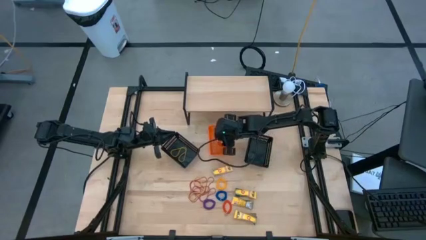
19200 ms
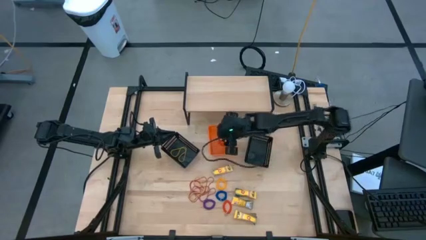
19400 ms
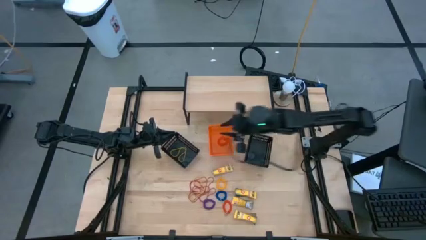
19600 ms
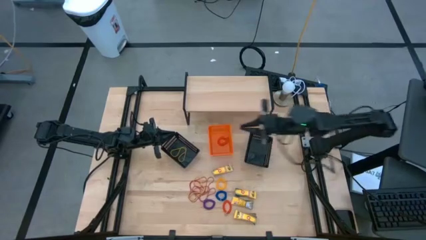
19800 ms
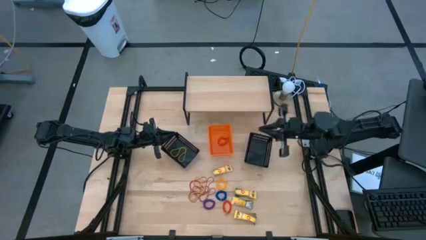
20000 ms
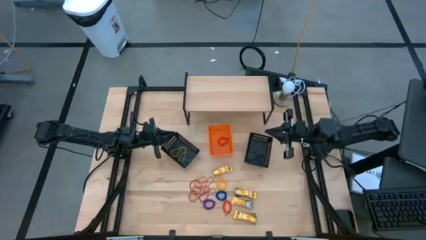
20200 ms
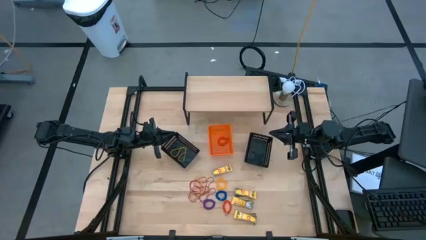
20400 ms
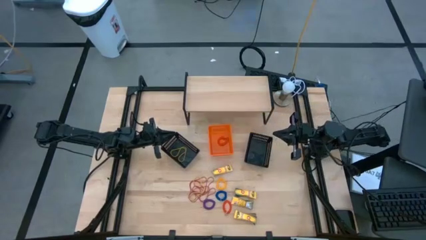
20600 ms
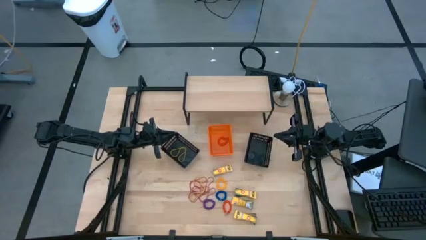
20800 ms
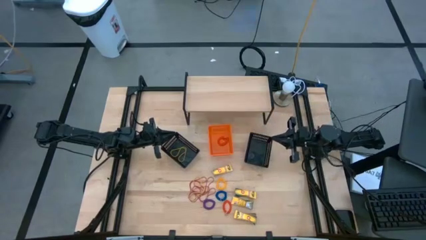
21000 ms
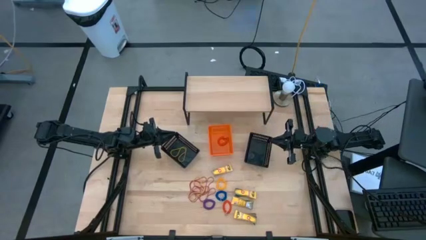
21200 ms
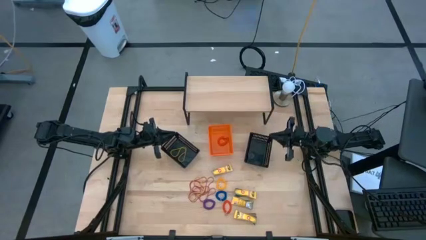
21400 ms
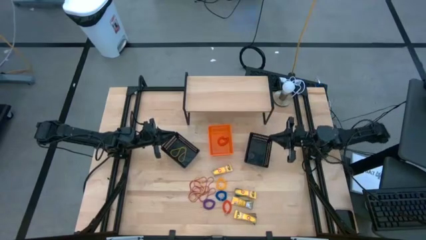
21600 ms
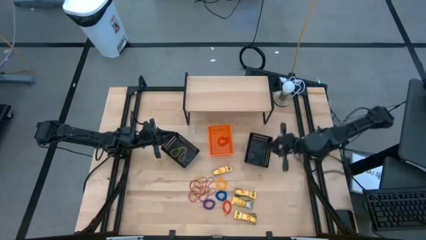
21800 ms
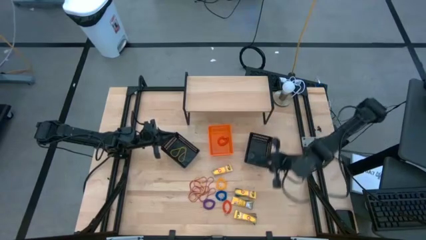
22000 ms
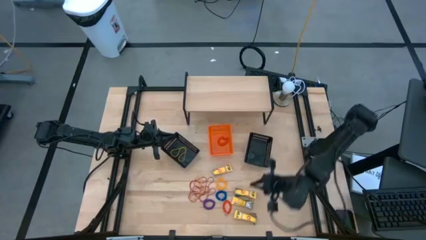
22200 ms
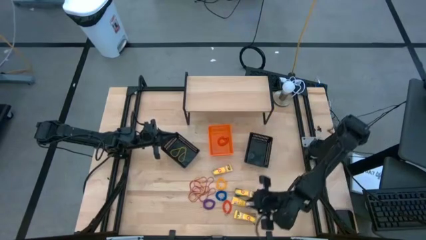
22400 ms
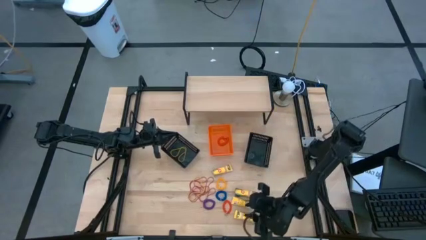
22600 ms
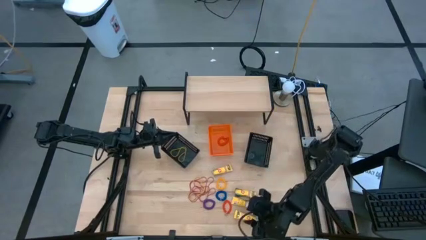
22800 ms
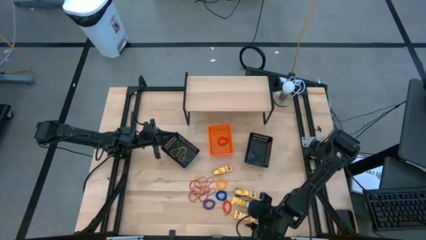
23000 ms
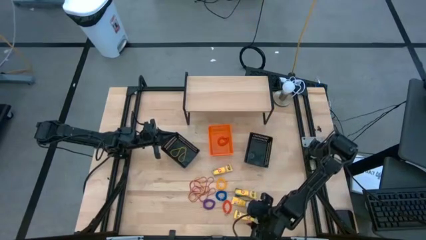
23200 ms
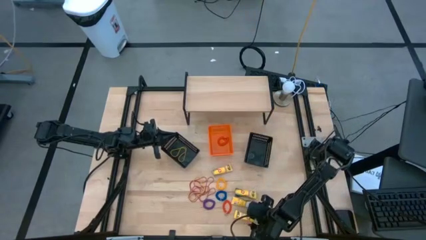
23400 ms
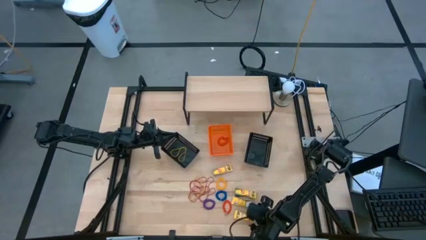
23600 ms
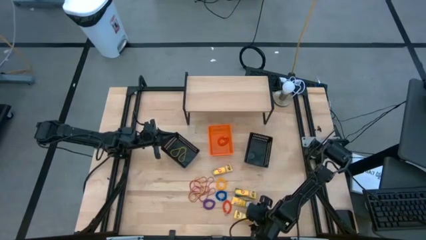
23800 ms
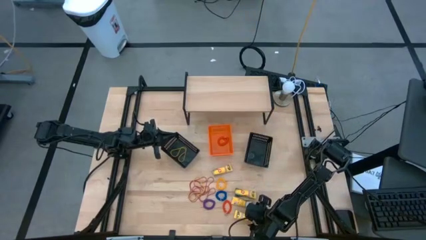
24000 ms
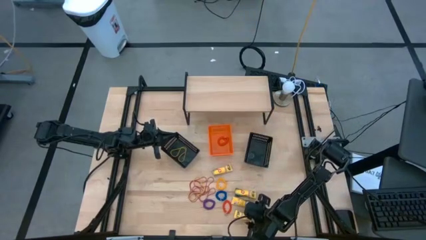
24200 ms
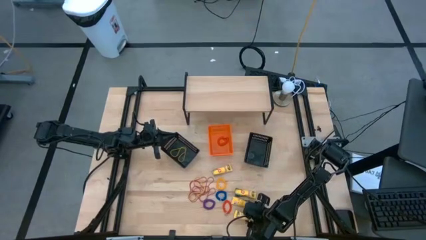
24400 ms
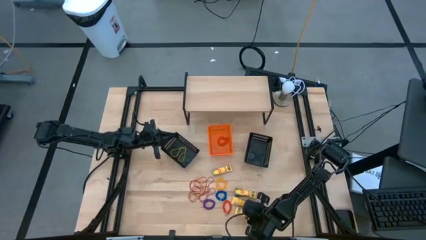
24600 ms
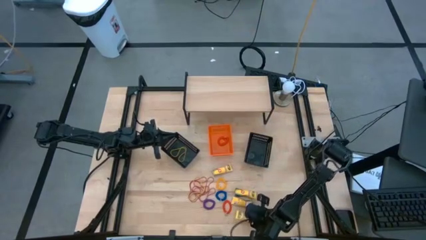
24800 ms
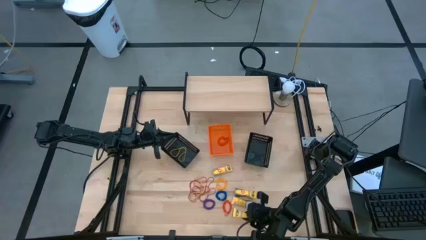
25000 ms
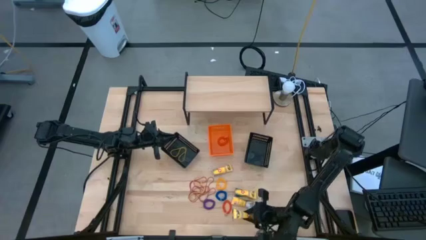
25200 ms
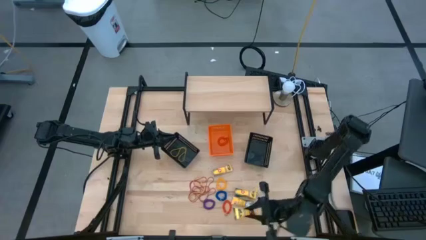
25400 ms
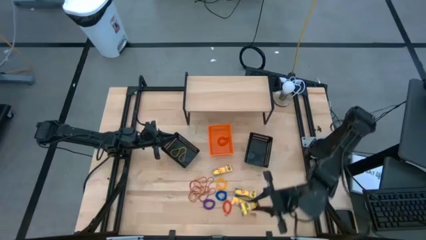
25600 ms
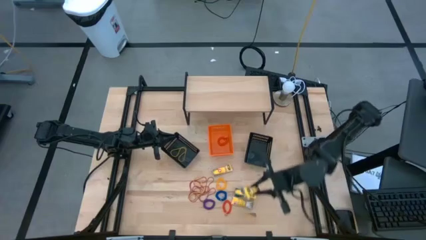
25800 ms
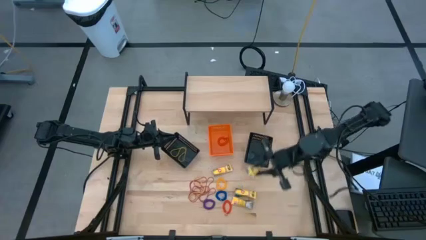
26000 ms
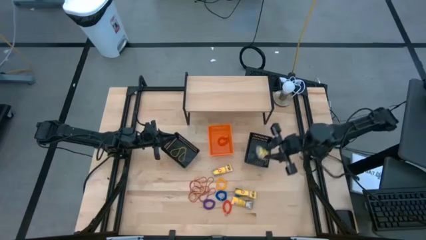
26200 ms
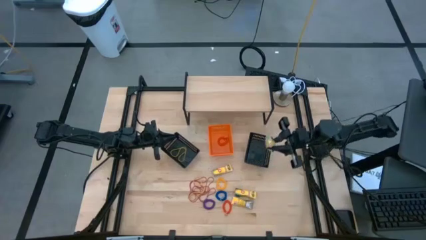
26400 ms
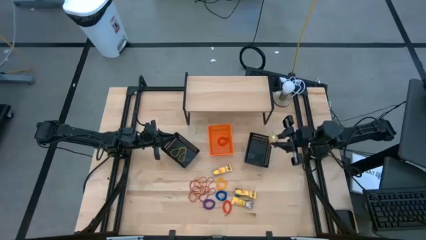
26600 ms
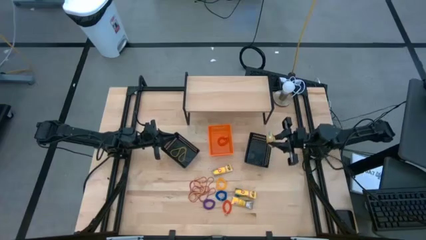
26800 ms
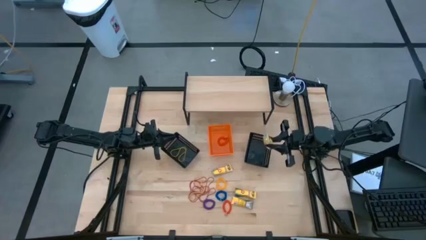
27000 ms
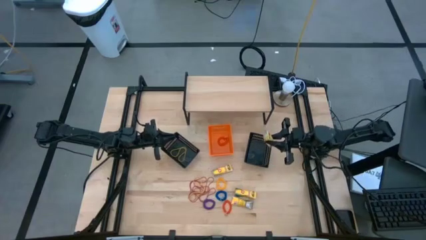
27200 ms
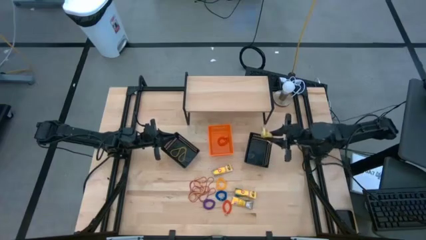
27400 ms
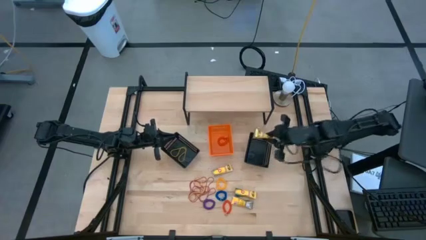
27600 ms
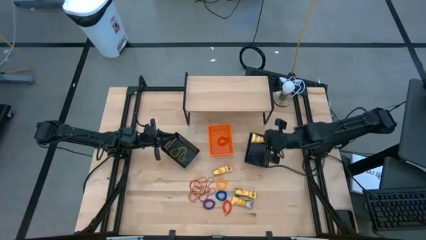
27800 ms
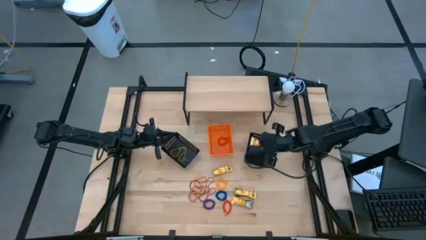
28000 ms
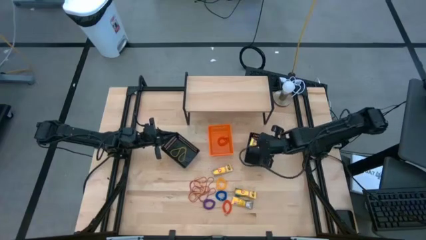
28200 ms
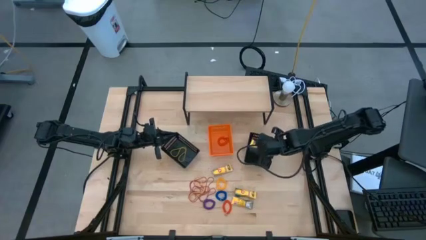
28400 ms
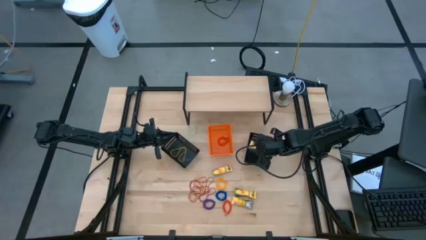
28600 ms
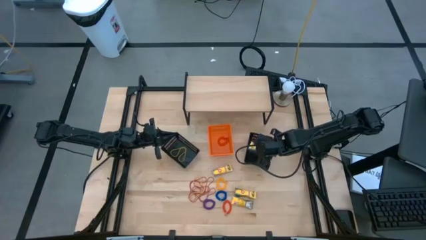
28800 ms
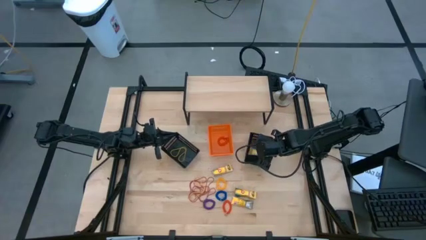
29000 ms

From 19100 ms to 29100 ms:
Task: Pick & Place Office Desk Supplies
Put the yellow pack of crayons into the right black bin

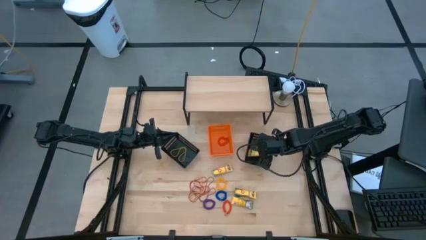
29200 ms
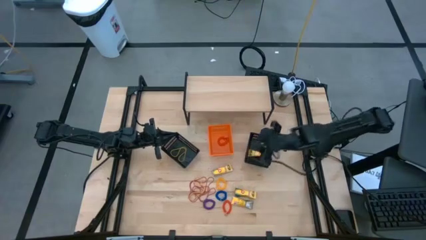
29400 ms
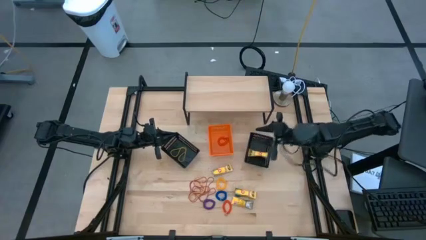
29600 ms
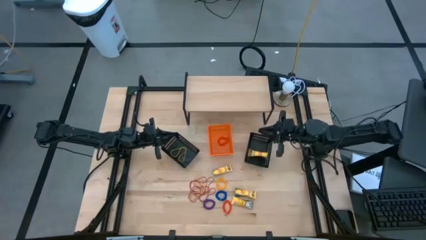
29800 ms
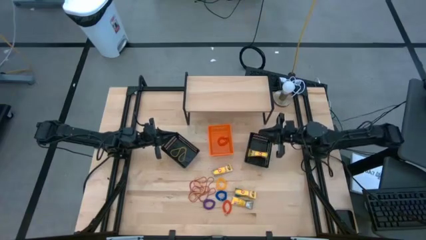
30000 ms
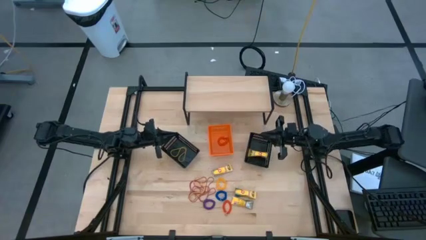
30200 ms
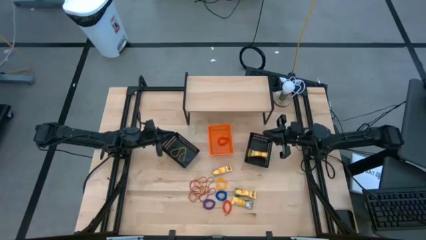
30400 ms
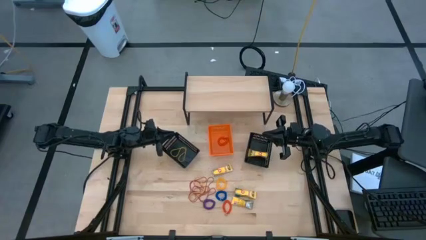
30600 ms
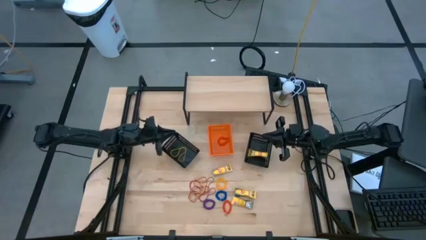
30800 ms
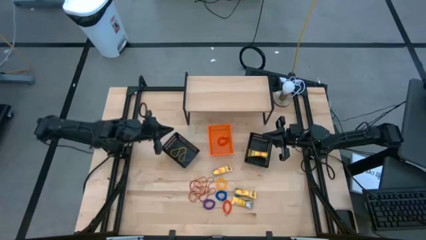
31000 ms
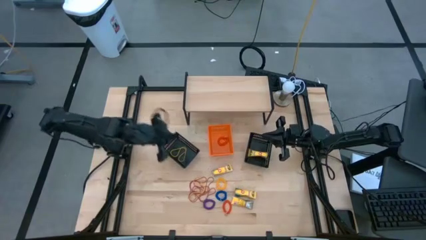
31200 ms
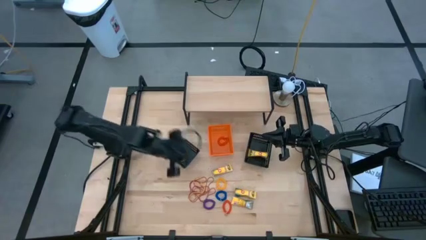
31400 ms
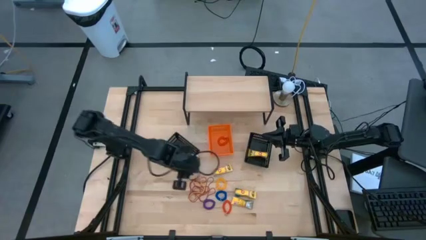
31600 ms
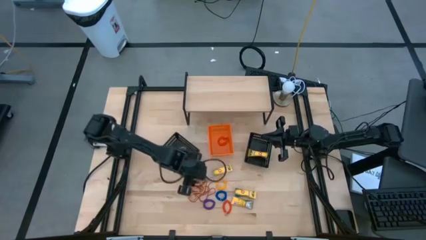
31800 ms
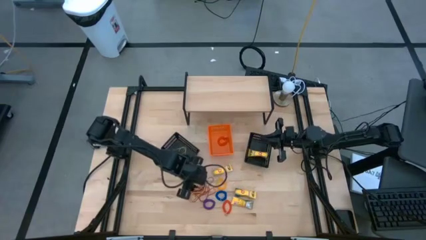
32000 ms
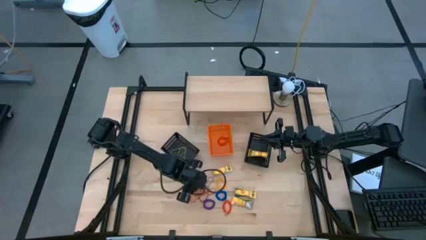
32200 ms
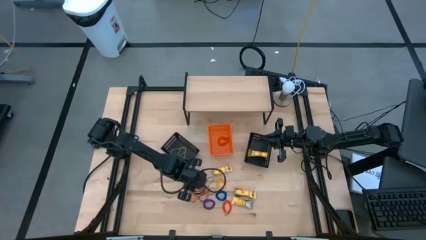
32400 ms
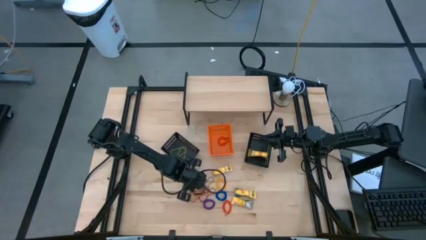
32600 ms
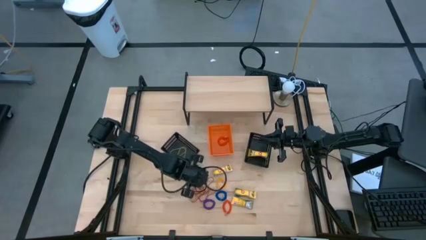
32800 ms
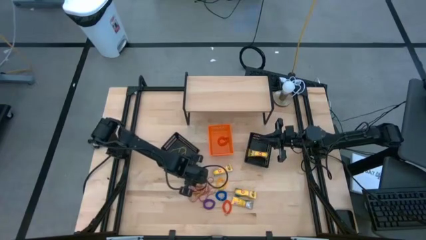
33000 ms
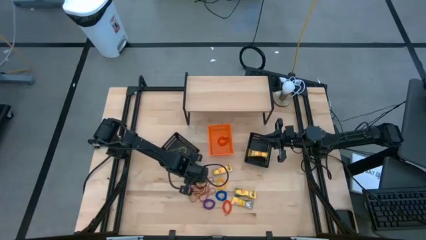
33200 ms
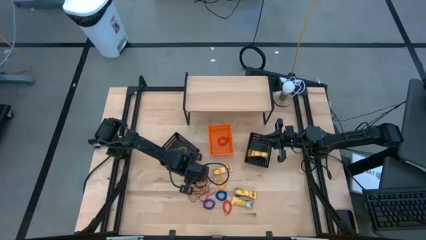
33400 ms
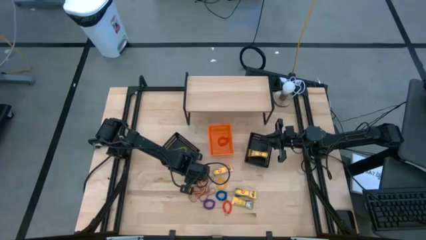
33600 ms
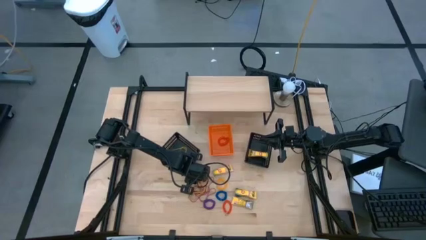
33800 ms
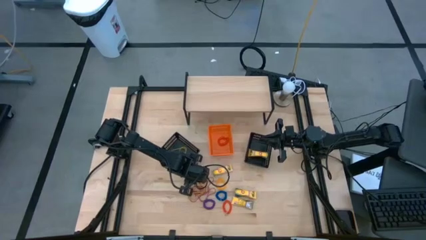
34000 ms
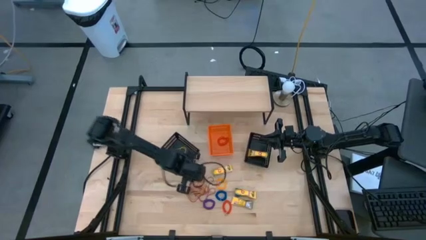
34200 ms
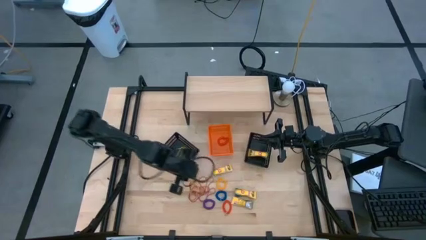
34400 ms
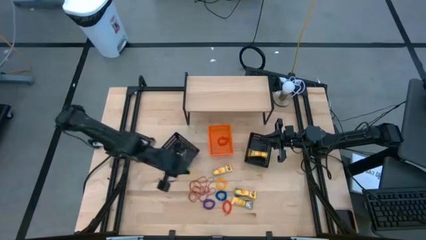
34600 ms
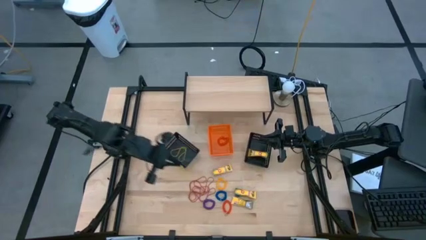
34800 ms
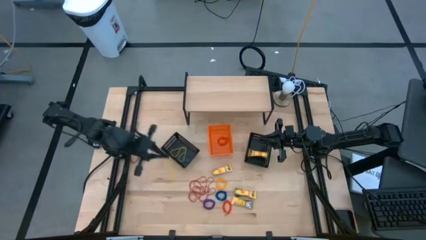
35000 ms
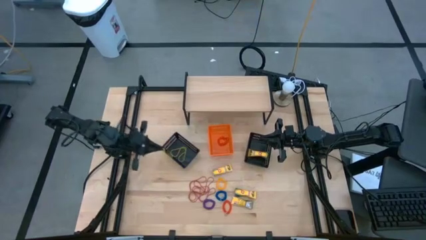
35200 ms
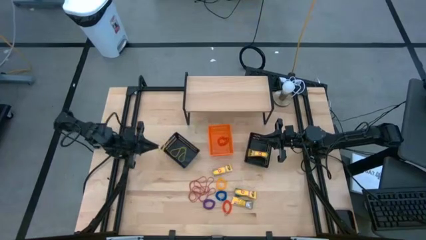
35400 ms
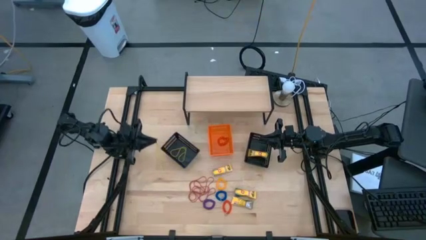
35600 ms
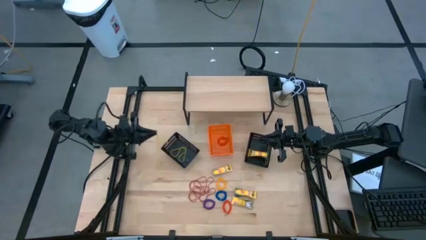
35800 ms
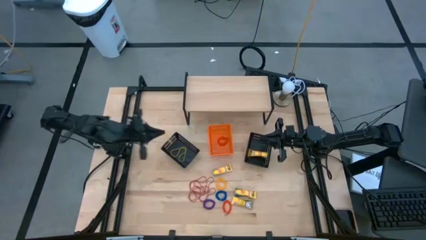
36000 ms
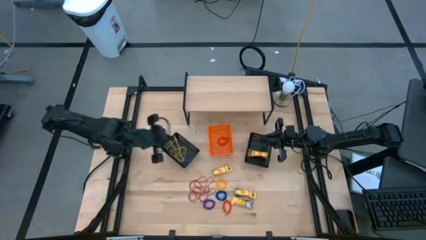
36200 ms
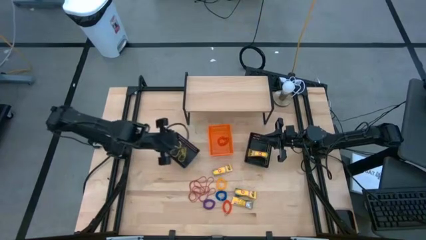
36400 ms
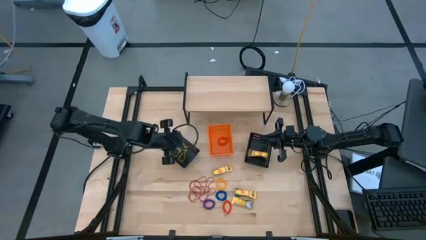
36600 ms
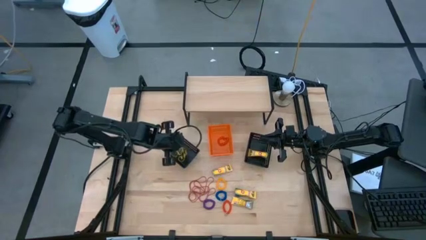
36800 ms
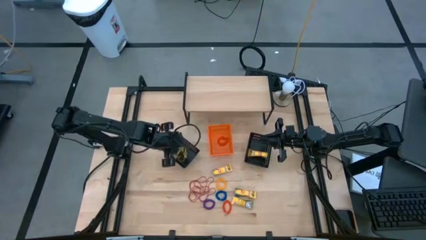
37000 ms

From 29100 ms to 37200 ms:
Put the yellow rubber band into the left black bin
